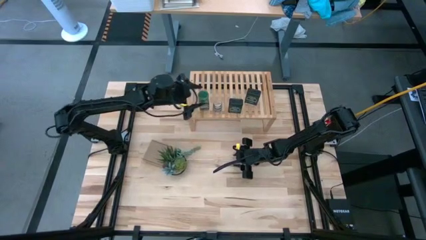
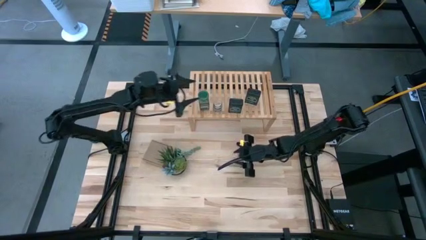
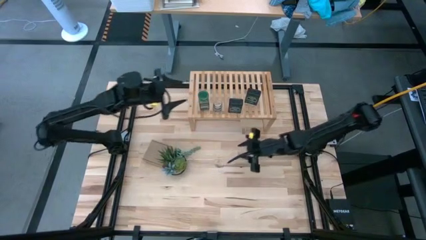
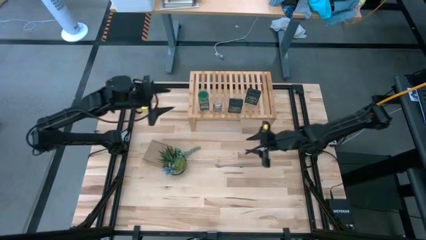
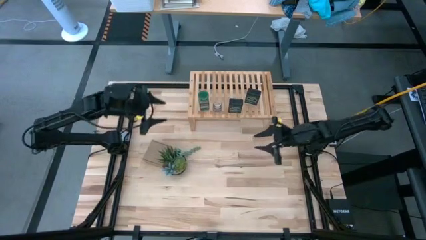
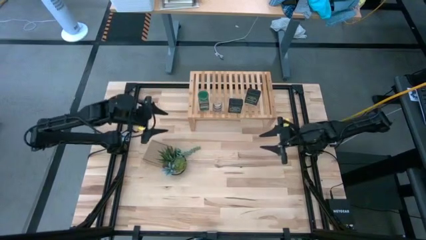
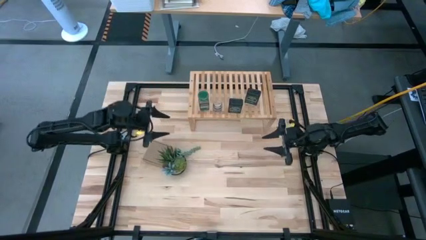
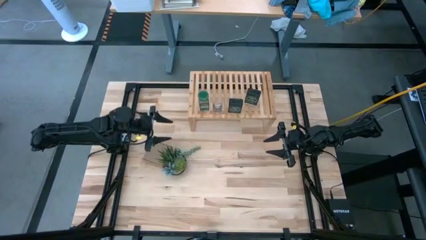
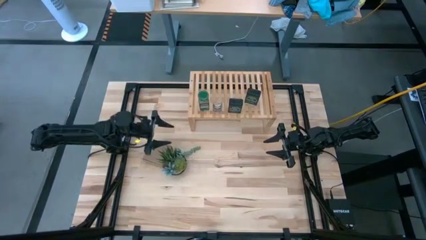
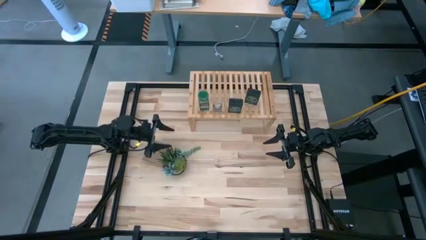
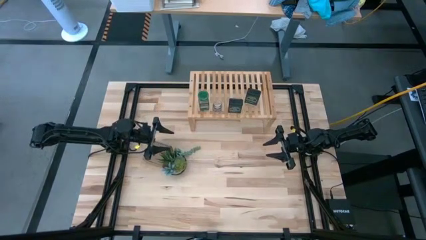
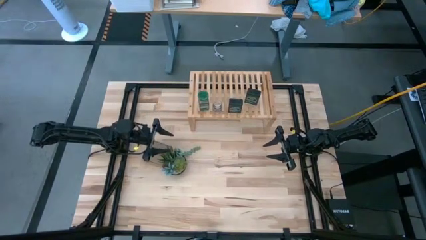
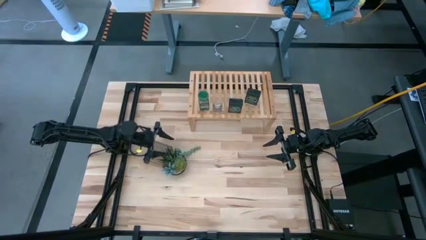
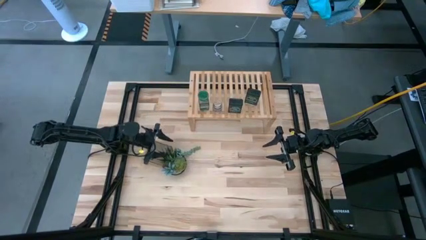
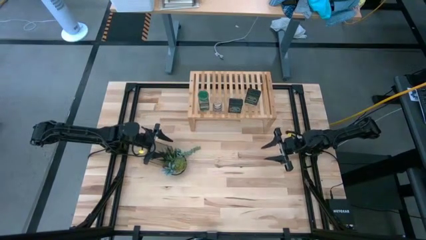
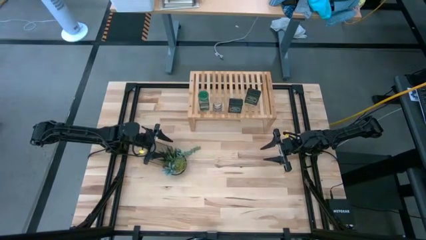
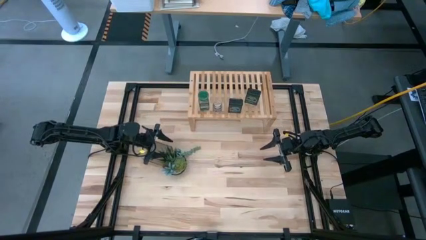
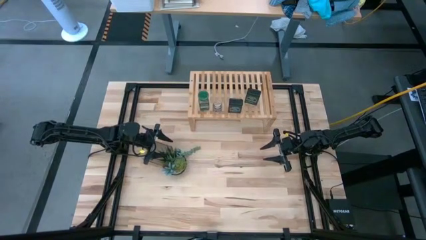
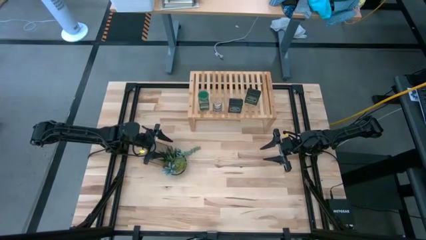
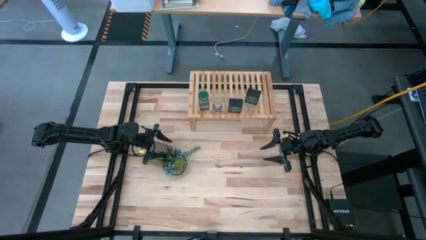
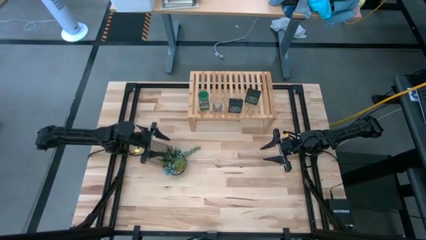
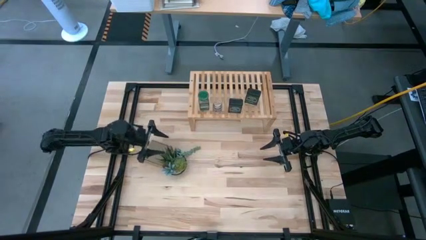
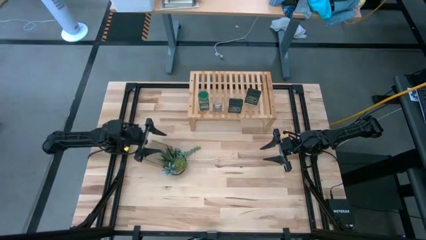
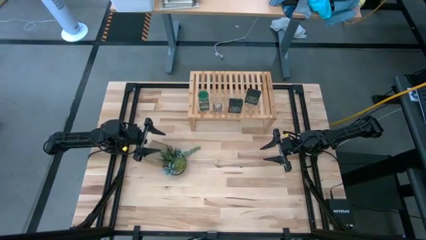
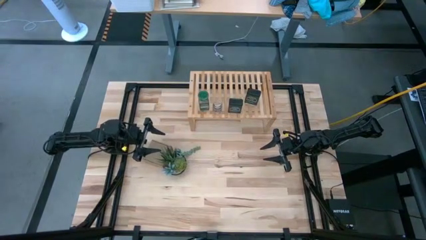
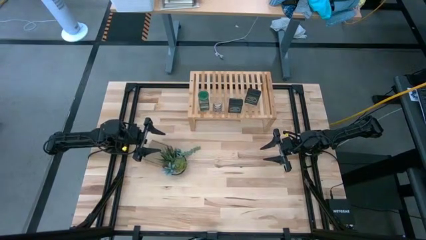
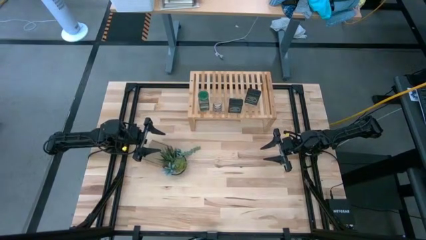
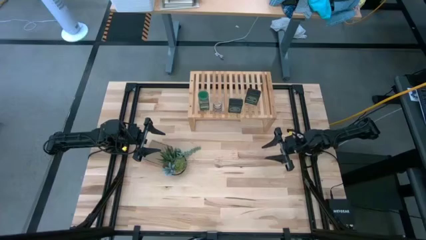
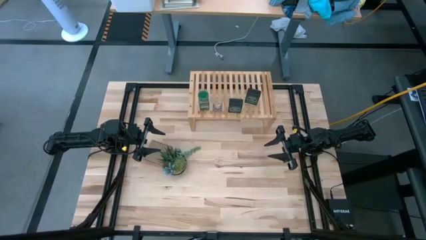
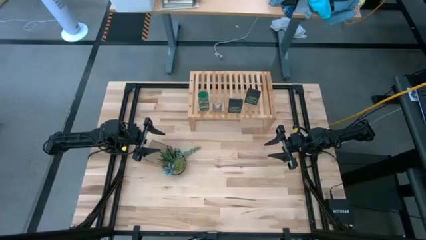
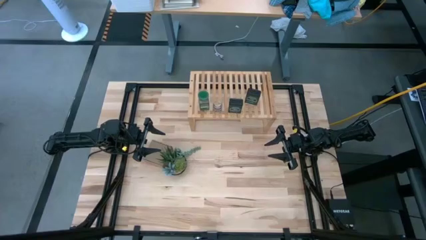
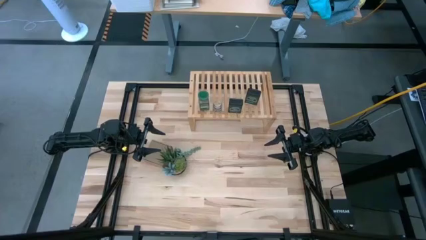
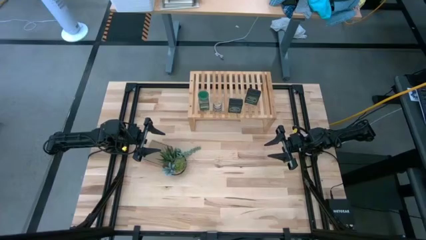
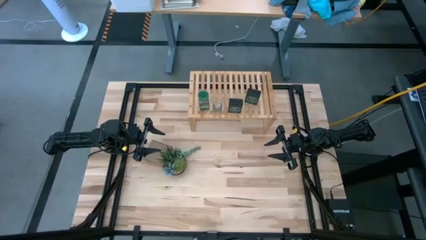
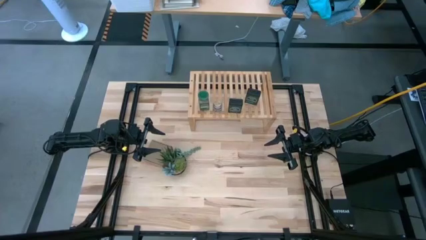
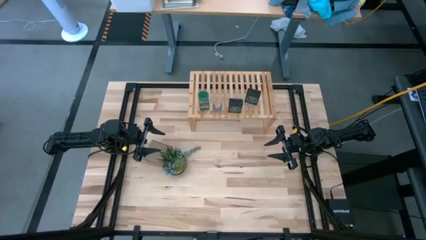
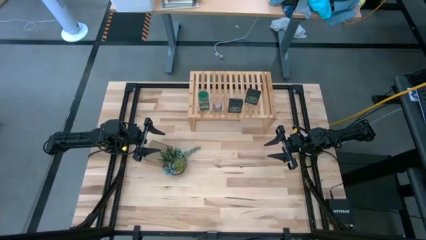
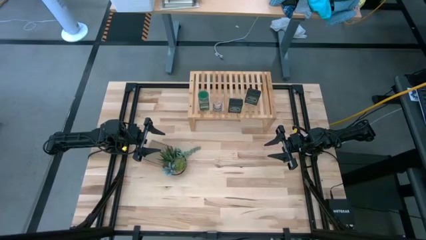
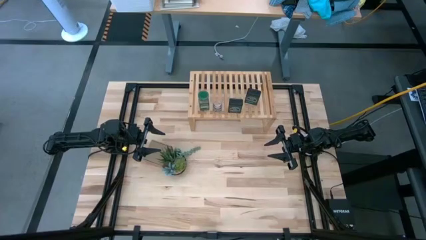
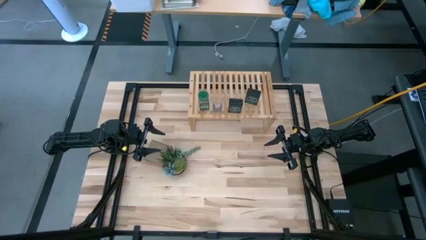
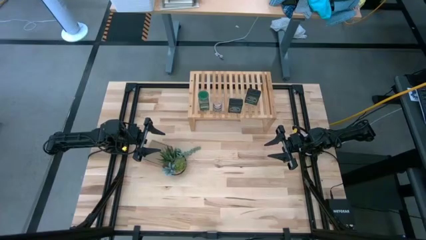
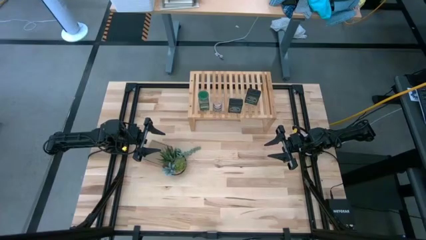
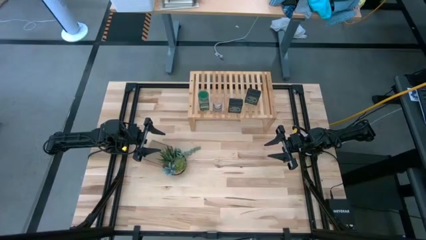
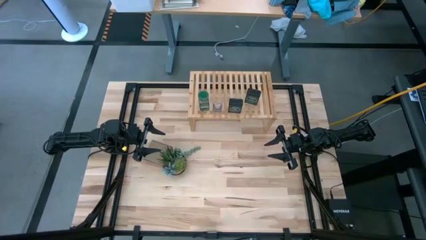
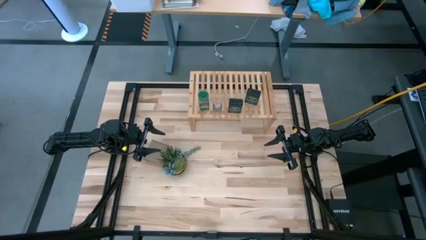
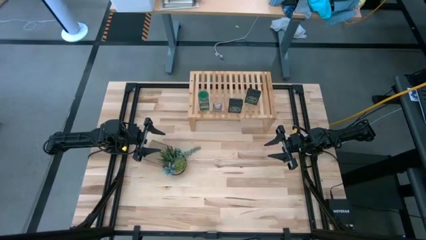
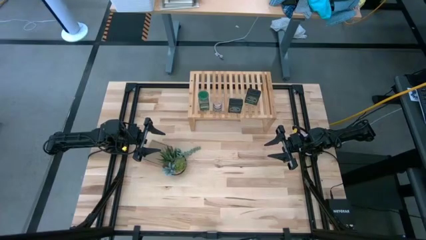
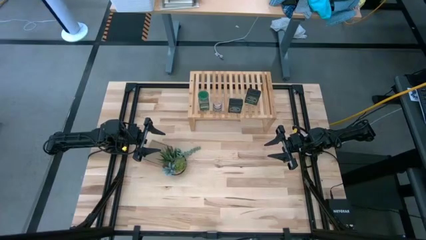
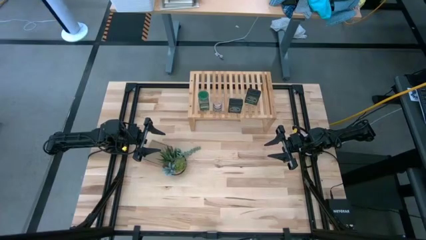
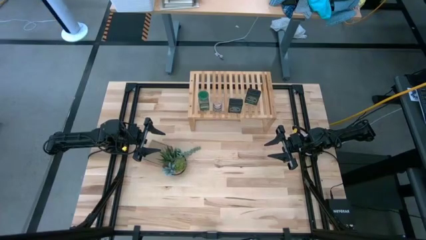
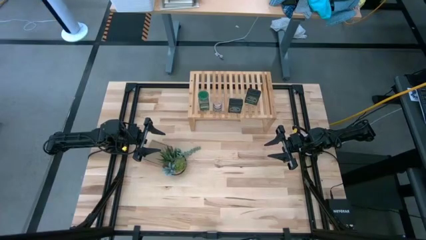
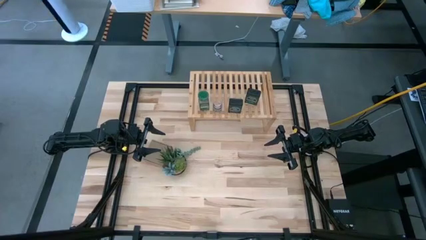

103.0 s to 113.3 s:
Task: Shelf spices
Return to Home Position

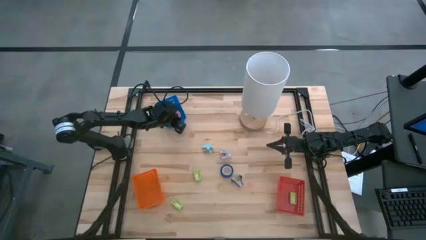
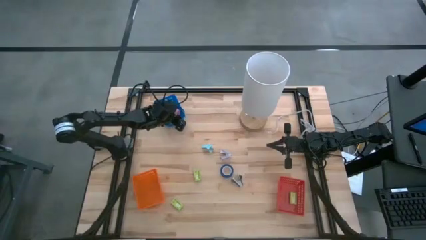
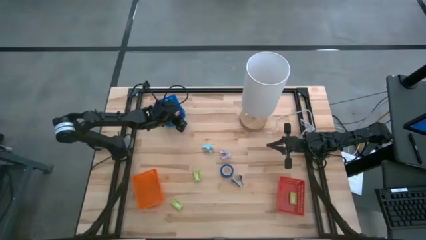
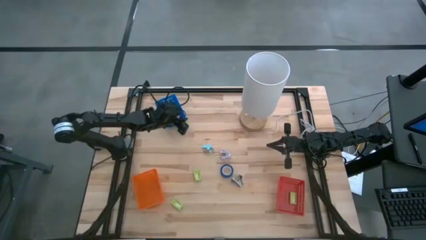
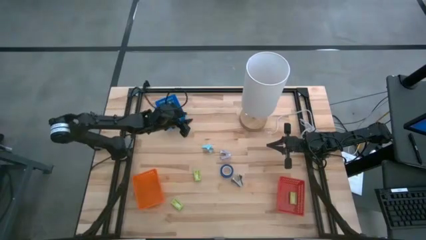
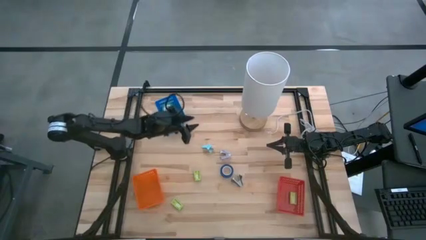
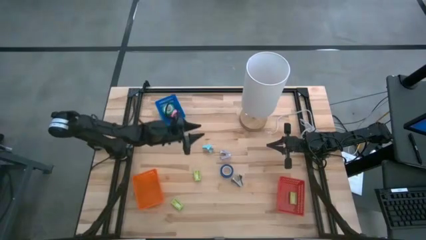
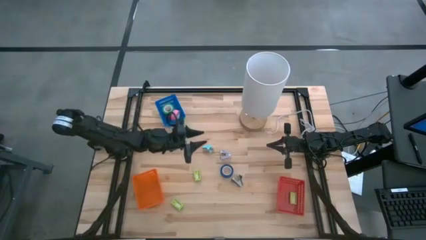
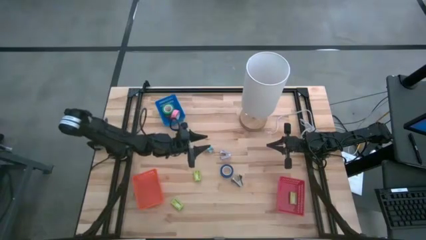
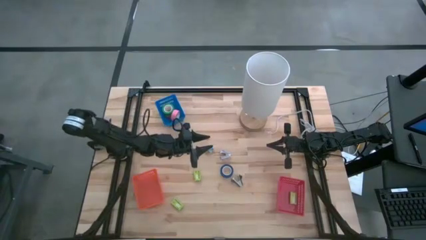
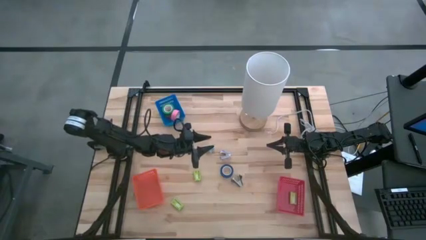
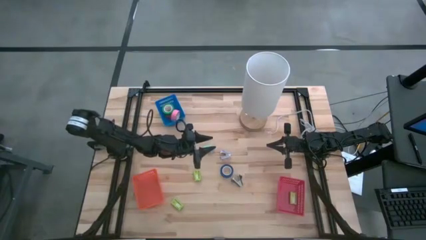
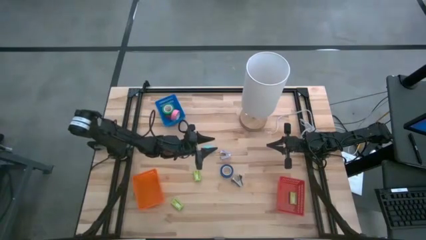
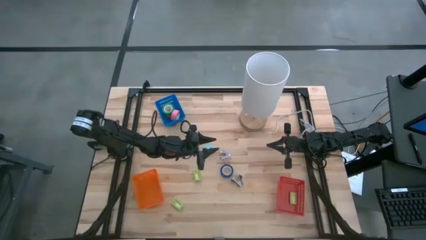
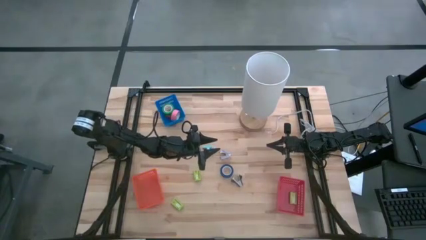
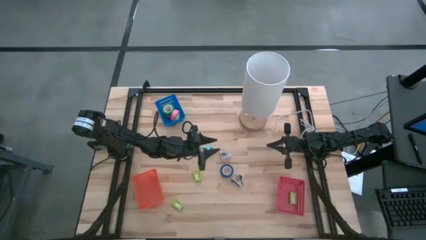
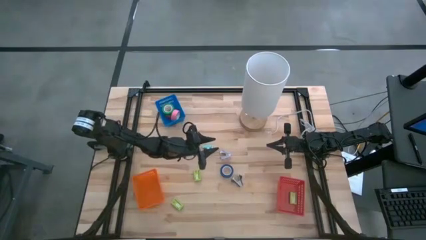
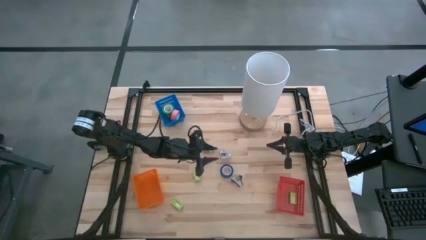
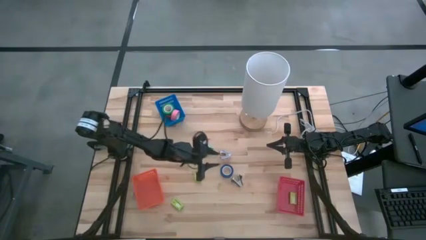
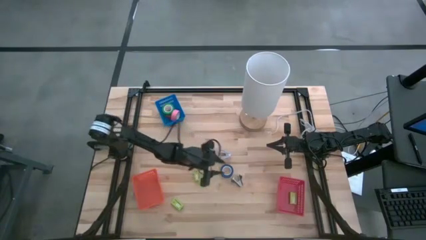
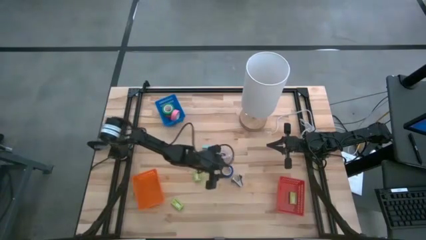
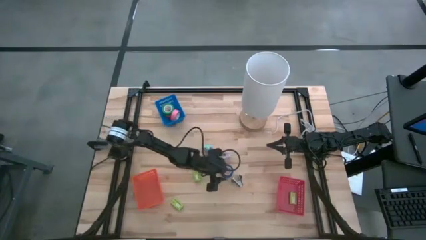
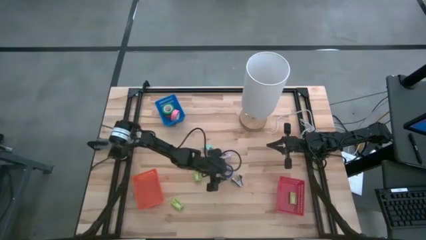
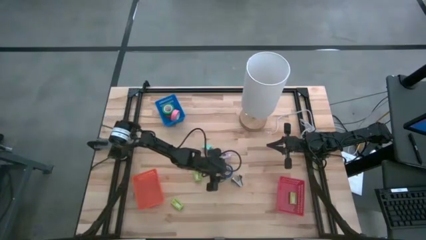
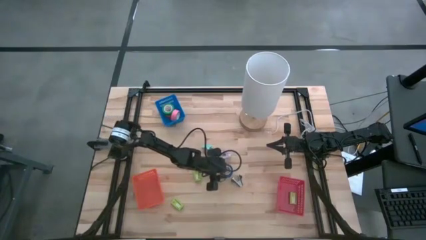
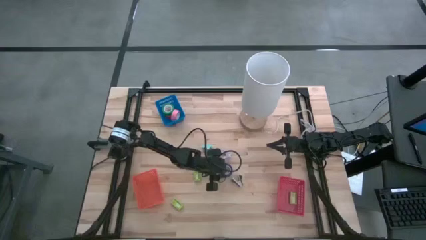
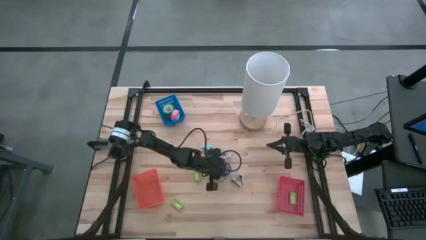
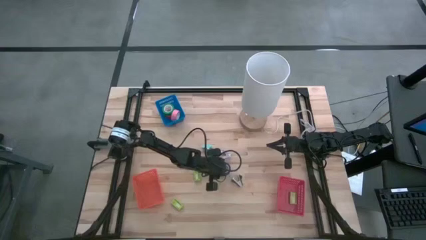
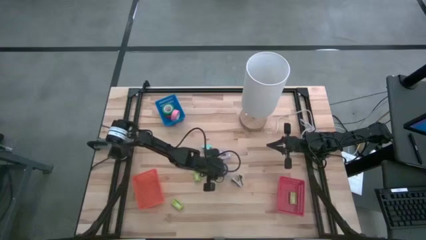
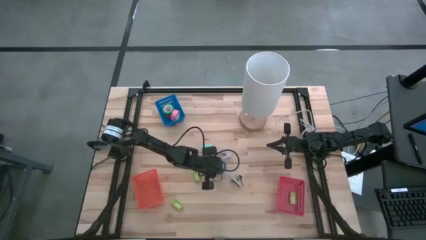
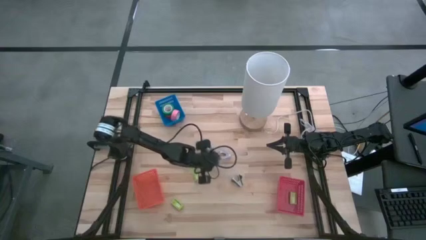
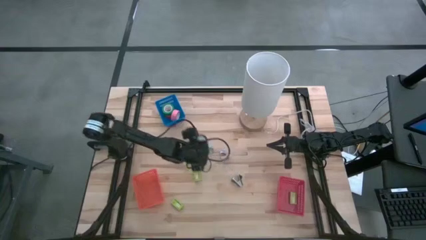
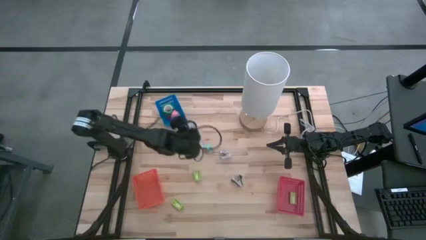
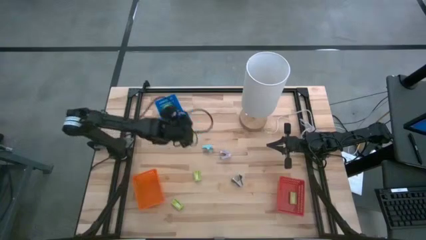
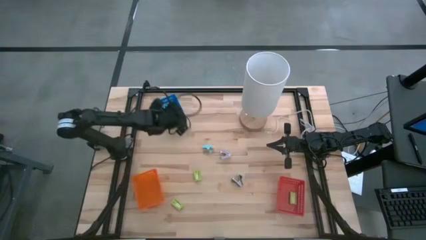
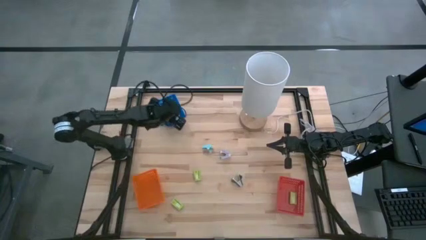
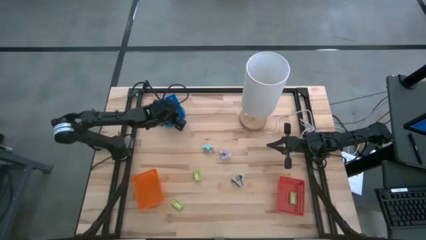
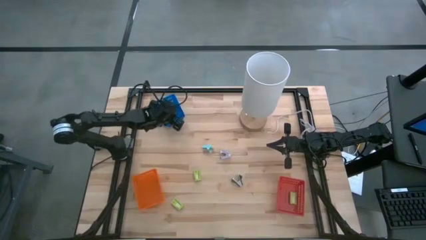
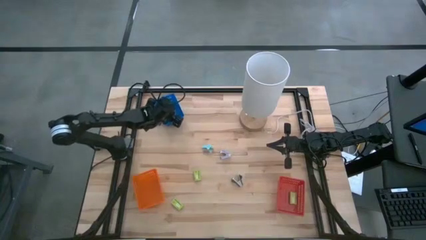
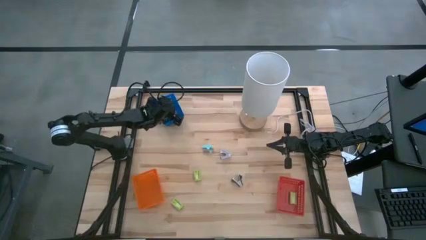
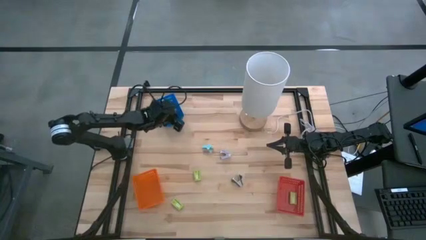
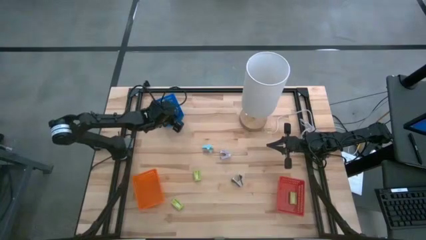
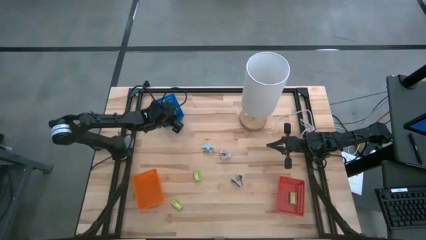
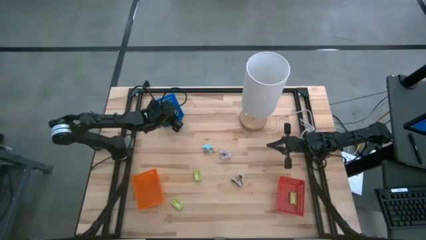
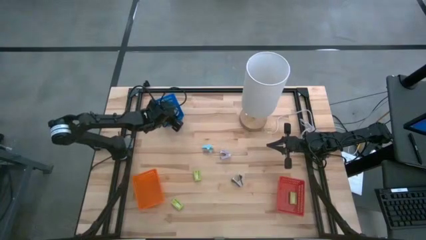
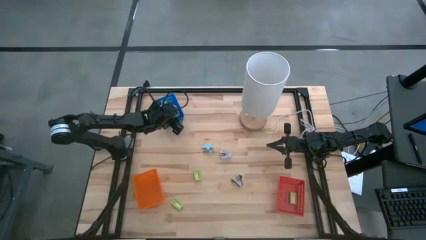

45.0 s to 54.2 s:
Task: Pick and place Stapler, Stapler remover, tape
Put the blue tape into the blue basket
